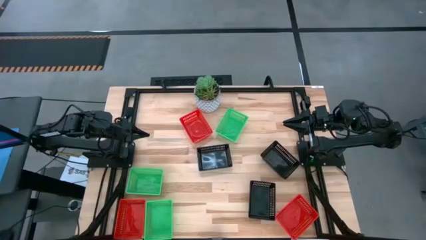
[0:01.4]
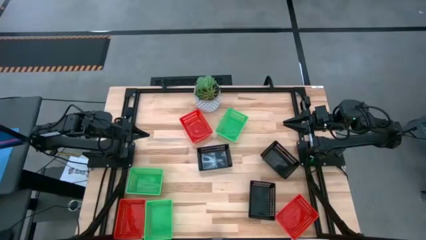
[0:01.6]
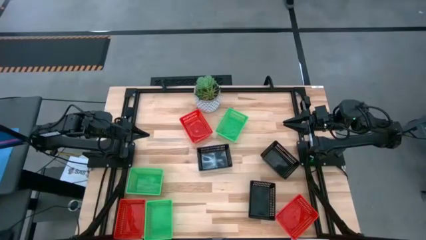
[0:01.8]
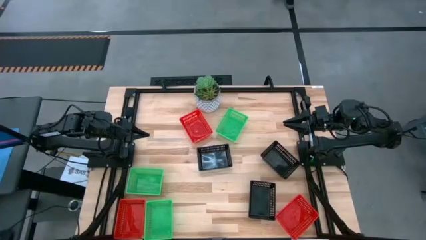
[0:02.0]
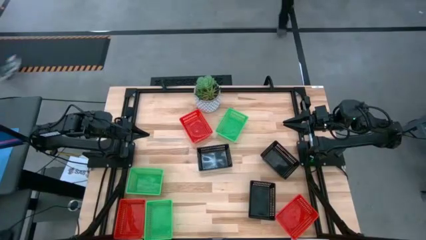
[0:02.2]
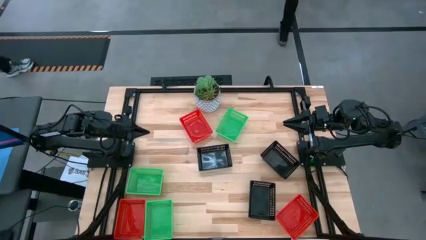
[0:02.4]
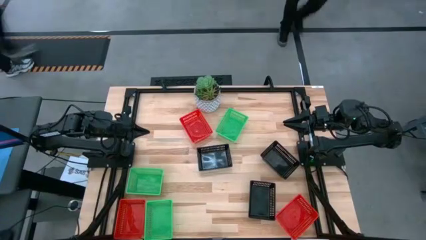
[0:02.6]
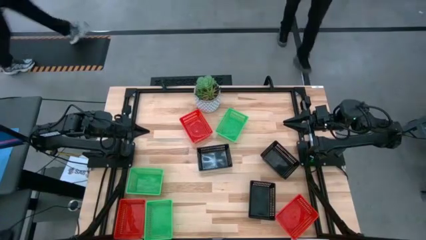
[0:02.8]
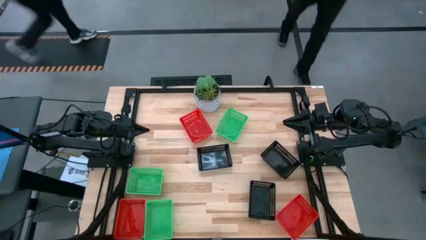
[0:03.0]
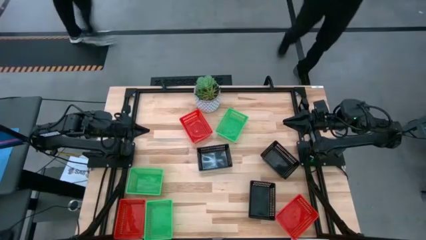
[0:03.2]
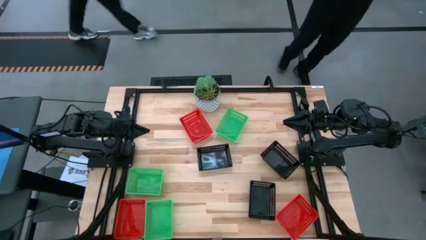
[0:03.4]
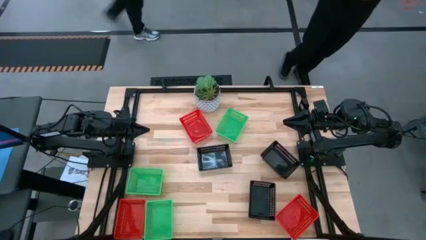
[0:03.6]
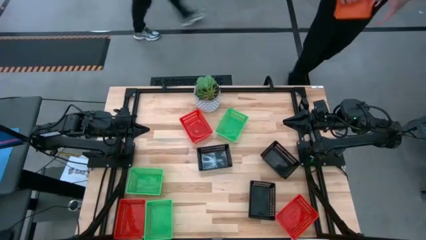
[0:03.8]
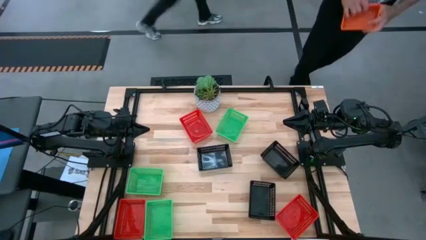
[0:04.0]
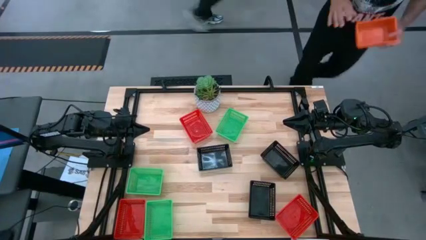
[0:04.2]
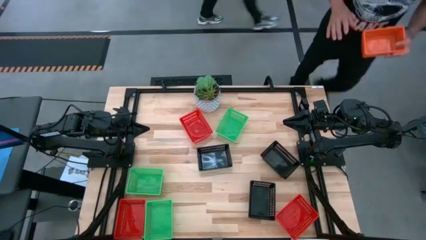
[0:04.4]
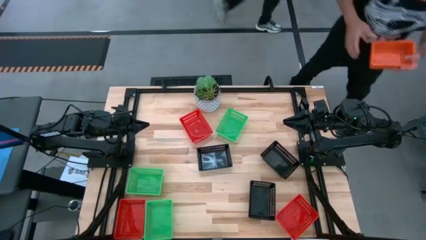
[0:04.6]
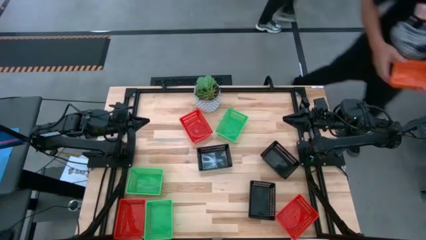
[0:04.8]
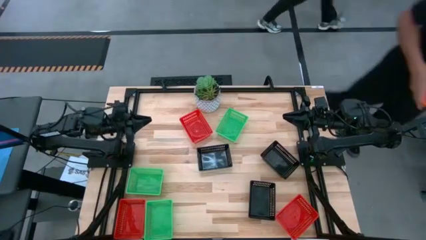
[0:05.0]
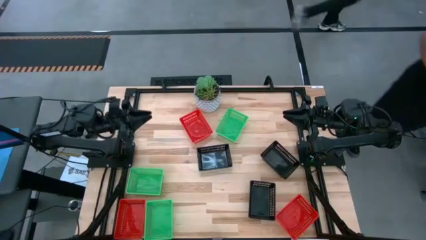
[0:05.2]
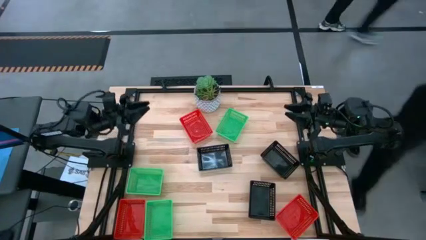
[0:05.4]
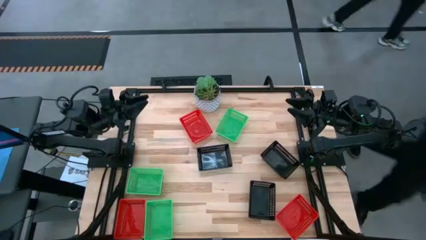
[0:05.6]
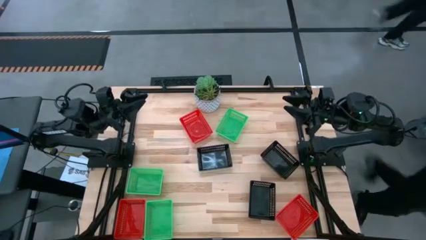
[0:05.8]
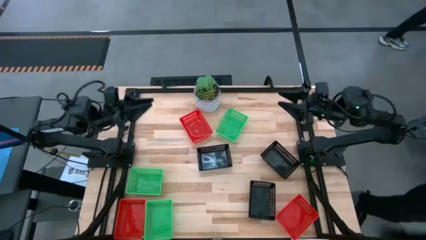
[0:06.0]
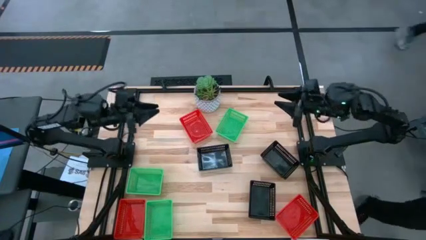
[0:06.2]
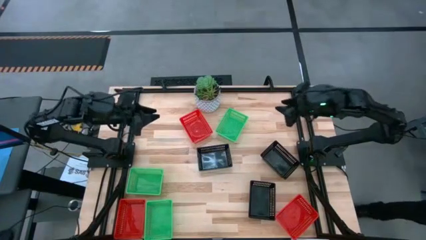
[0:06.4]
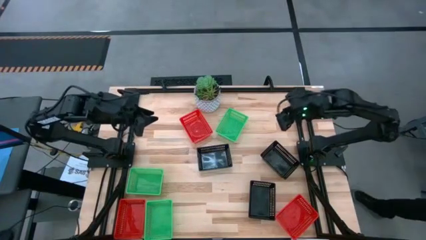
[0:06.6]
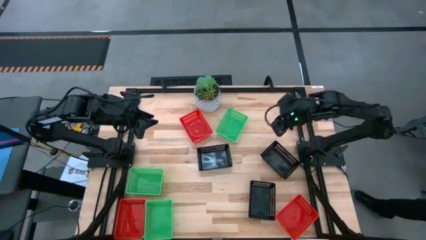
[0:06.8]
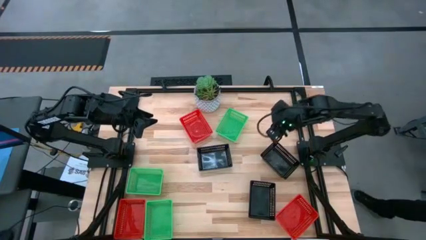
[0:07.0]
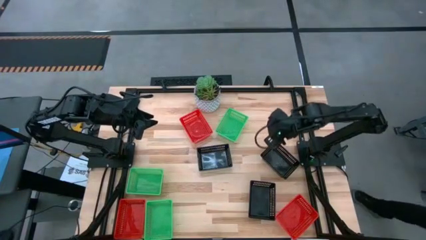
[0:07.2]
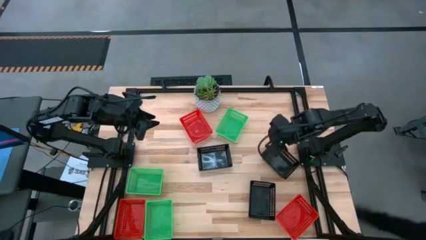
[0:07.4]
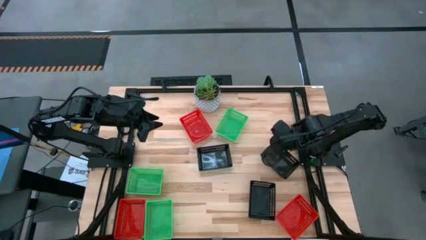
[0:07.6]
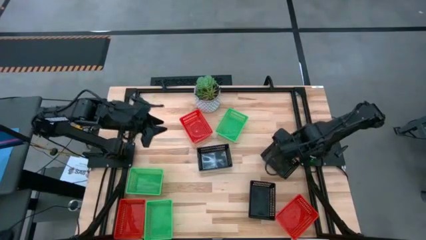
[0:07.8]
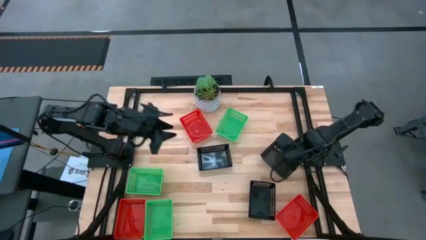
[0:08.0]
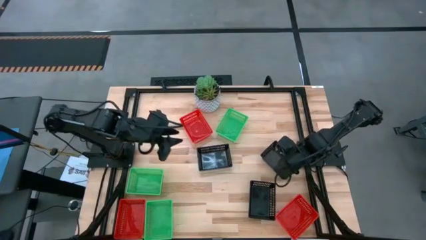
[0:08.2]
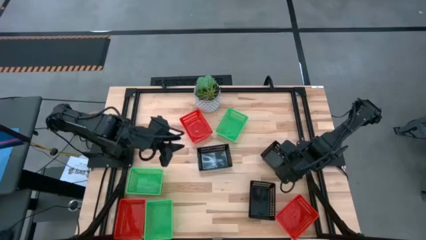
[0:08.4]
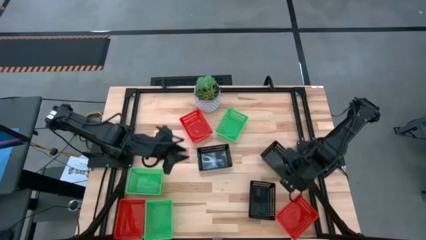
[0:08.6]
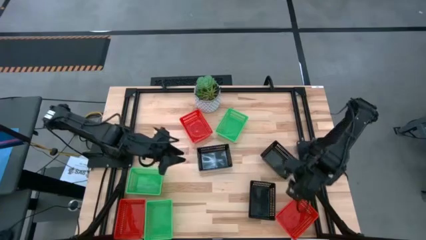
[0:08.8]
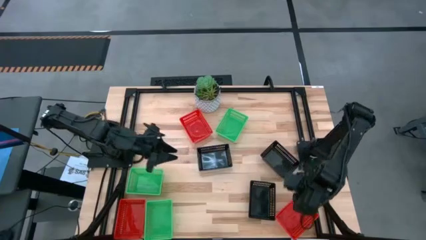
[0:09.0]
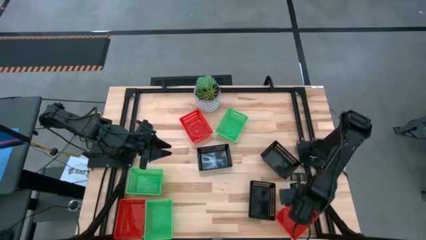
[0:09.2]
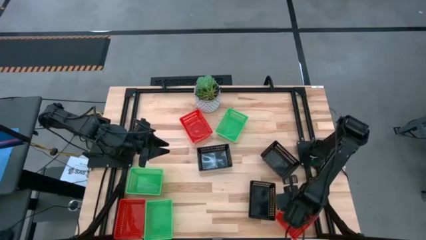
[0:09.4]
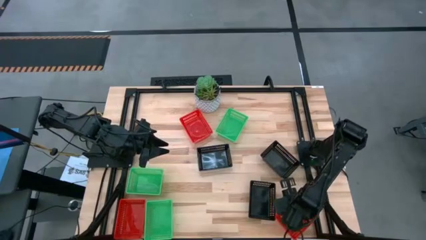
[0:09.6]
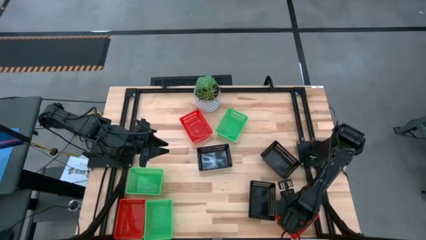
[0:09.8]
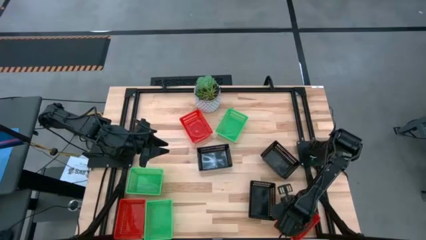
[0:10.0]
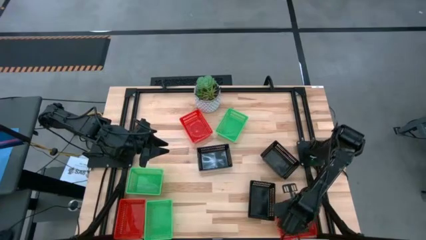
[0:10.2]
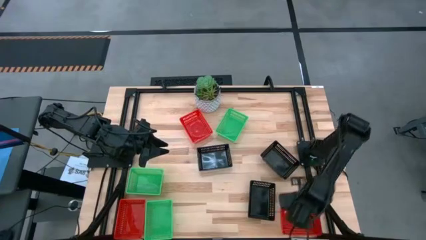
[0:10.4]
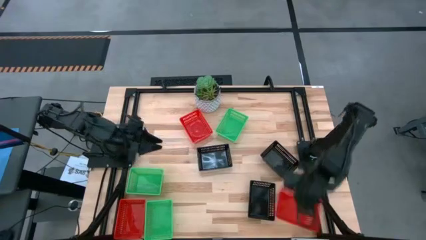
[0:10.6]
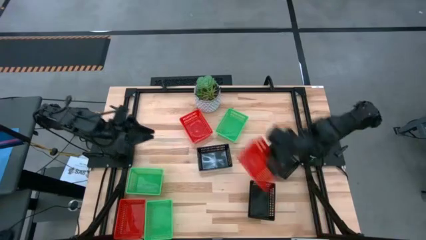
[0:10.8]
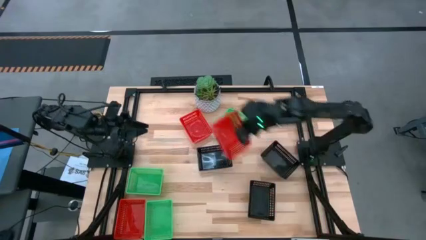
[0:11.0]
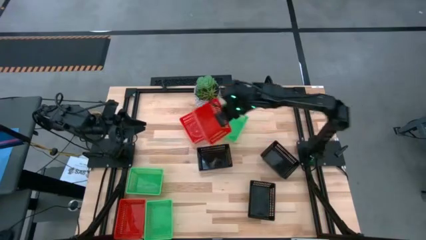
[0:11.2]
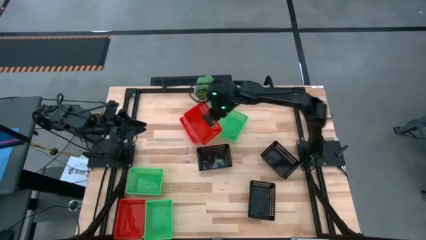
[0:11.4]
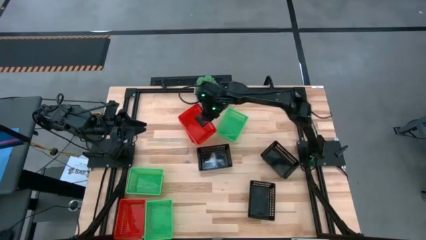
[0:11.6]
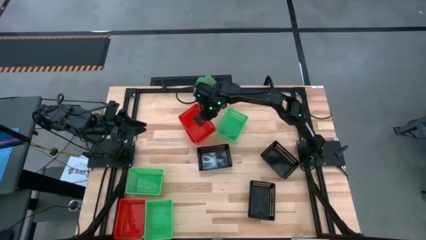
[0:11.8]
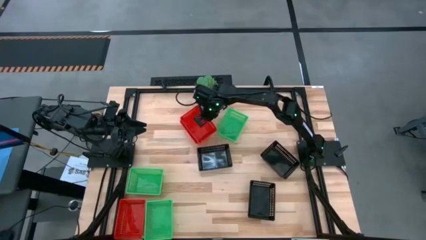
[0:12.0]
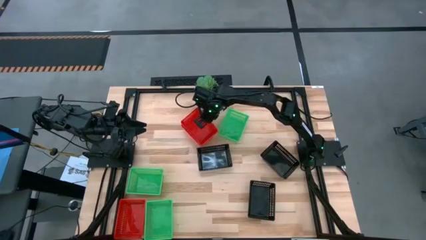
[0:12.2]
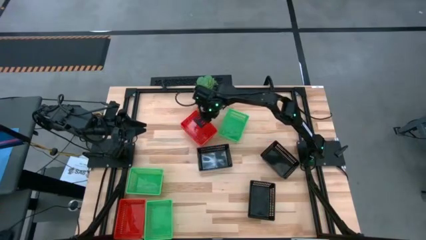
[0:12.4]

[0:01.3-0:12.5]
Stack the right red bin on the top left red bin
